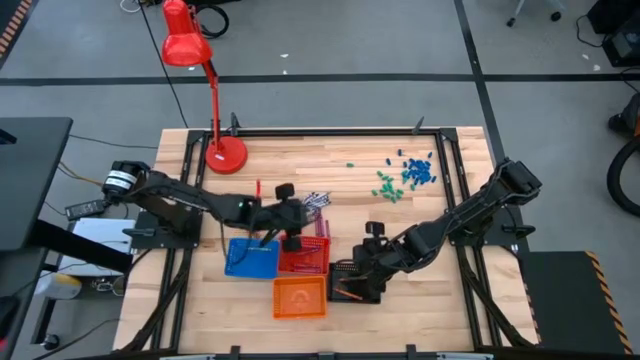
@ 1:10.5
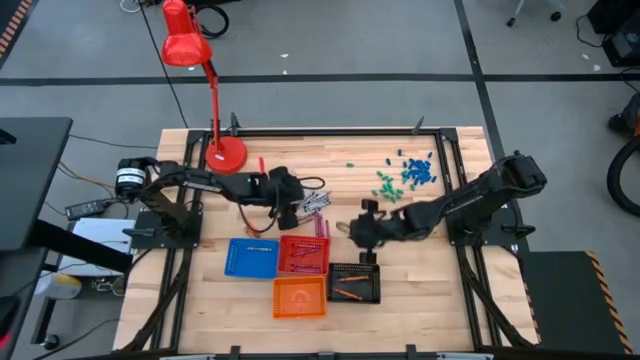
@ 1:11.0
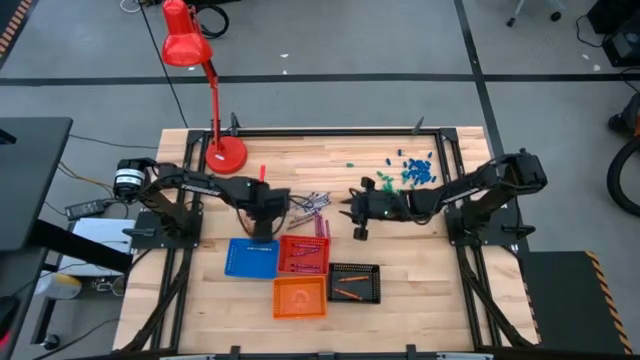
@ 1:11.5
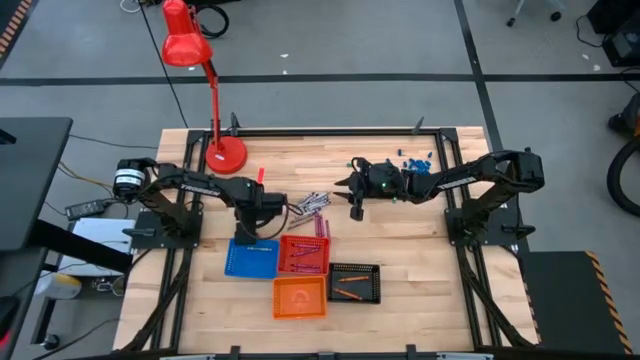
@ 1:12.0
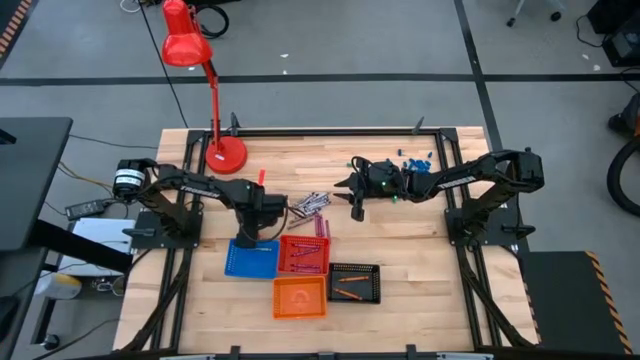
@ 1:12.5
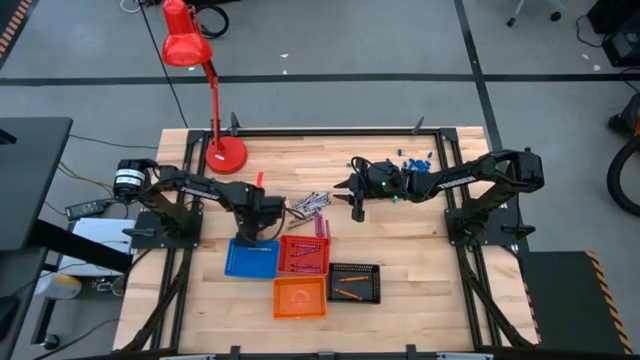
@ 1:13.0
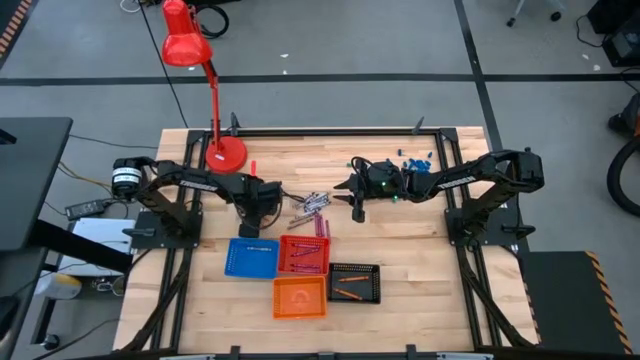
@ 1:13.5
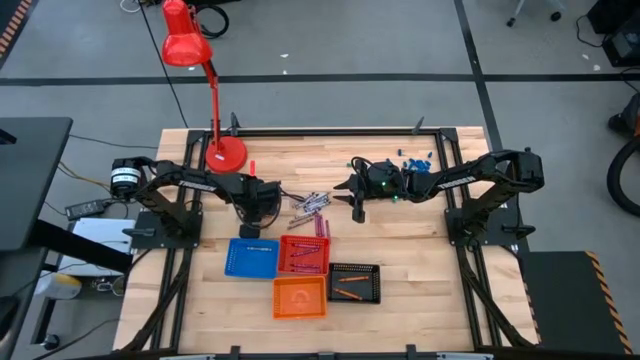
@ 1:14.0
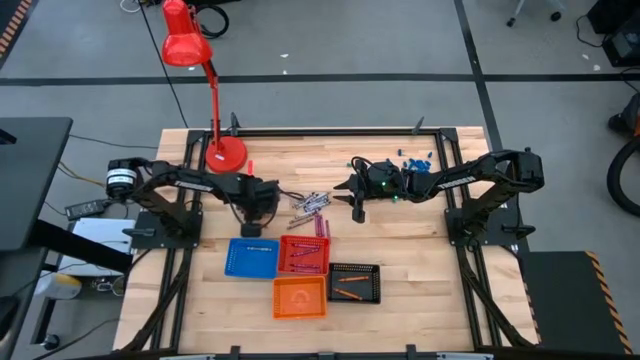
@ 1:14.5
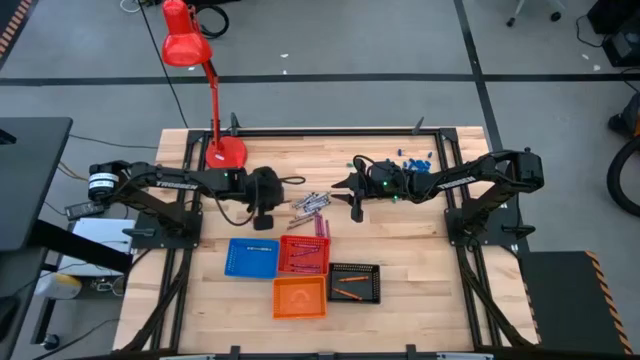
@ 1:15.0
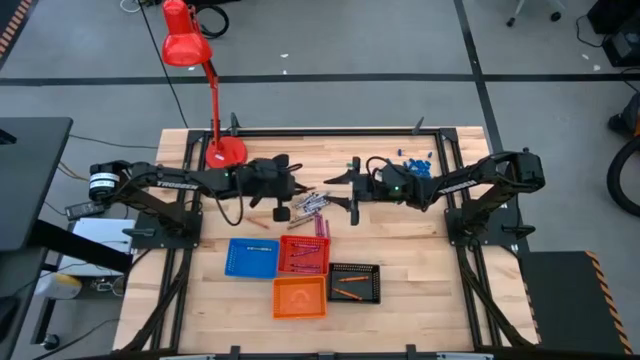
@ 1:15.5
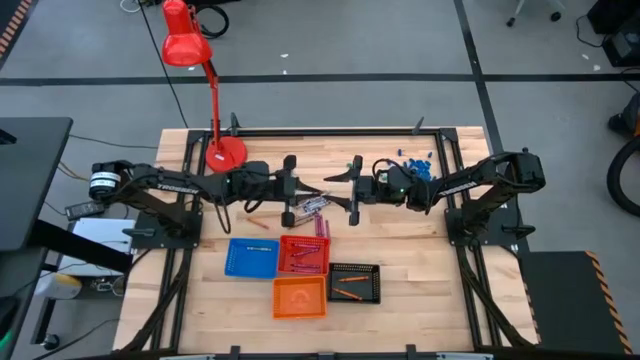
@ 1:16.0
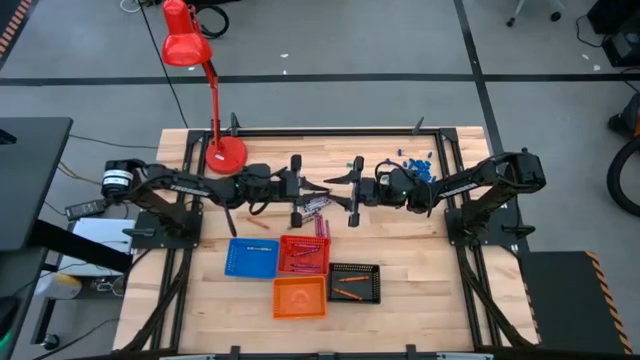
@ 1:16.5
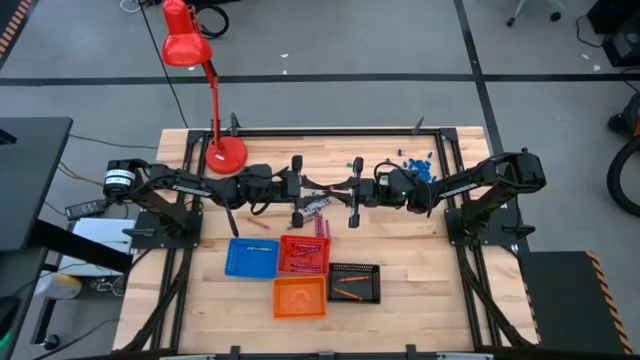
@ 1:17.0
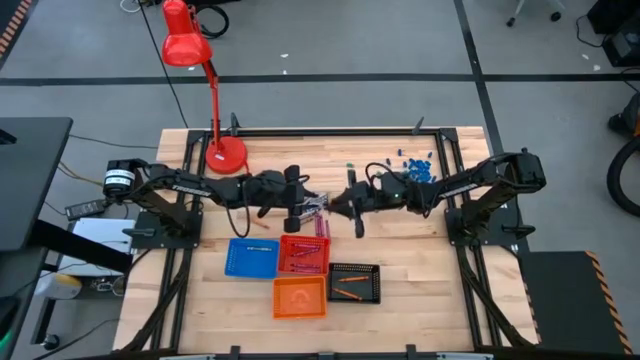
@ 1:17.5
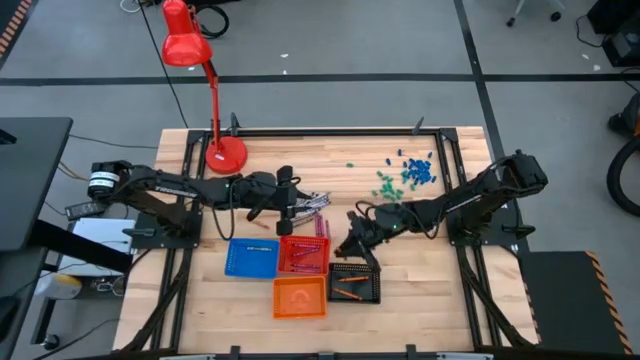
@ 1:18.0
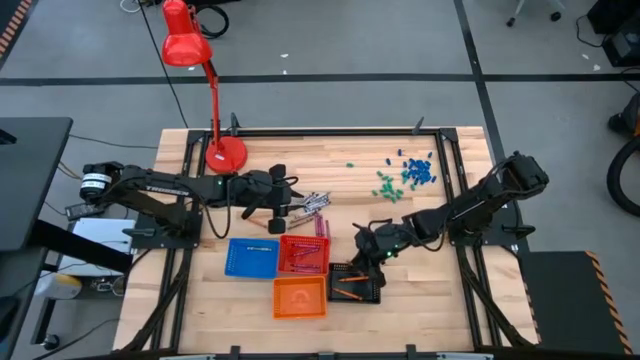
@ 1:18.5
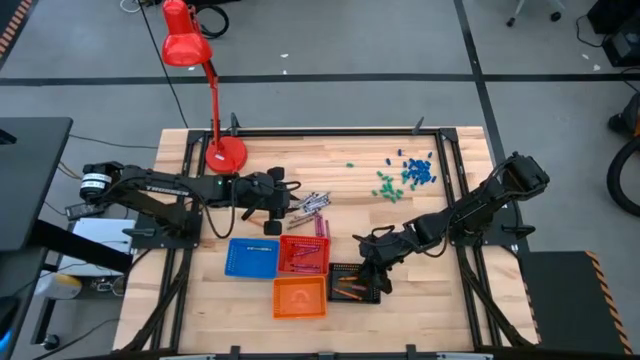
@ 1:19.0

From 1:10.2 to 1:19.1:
Task: Sort crayons
Put the orange crayon into the black bin

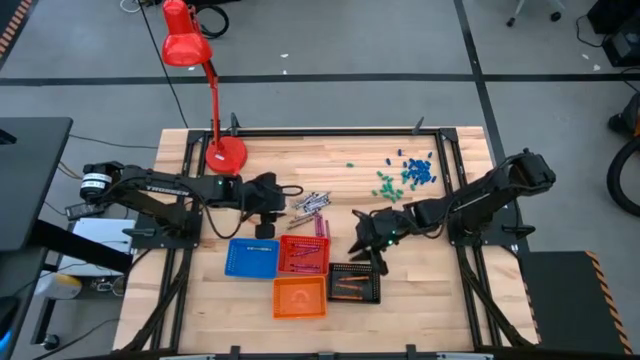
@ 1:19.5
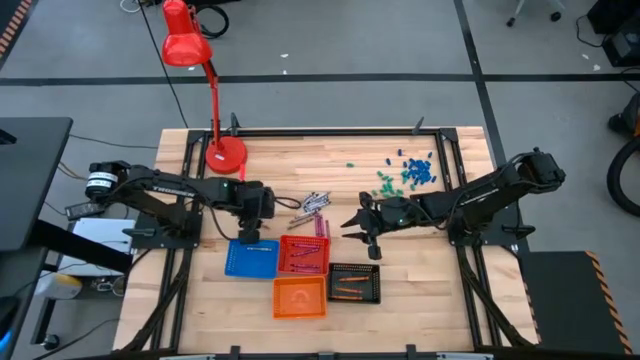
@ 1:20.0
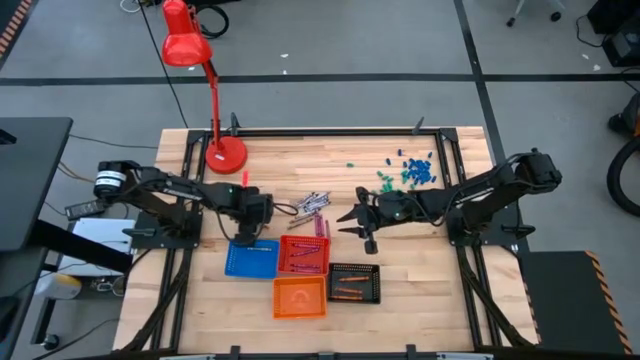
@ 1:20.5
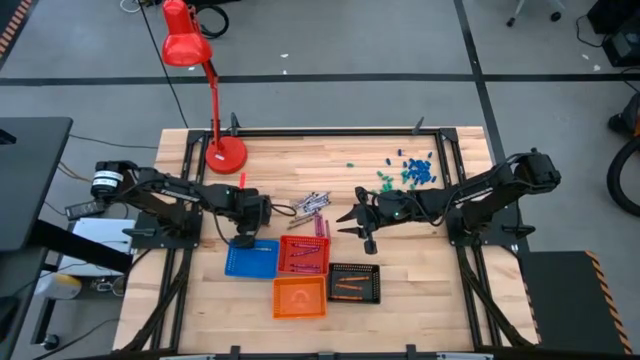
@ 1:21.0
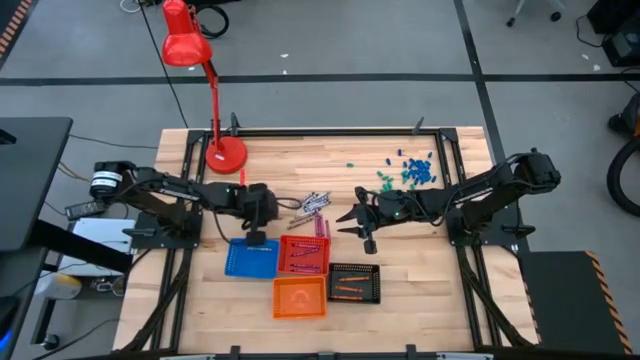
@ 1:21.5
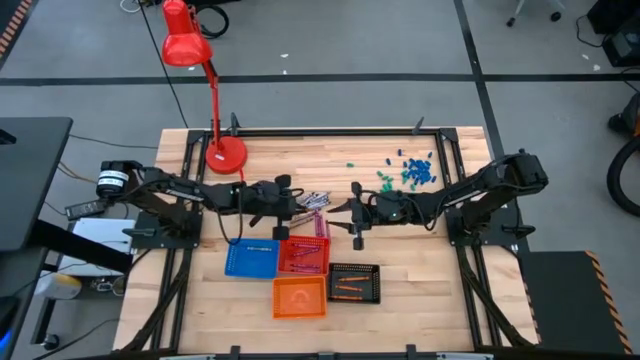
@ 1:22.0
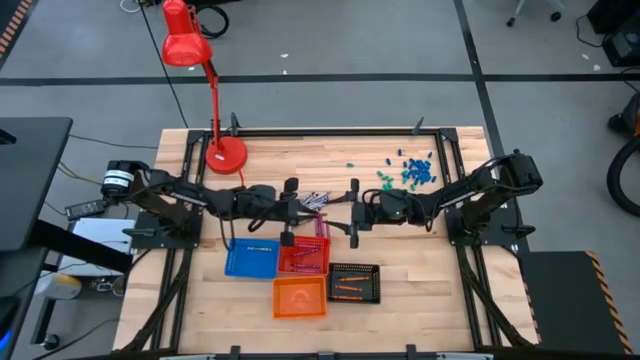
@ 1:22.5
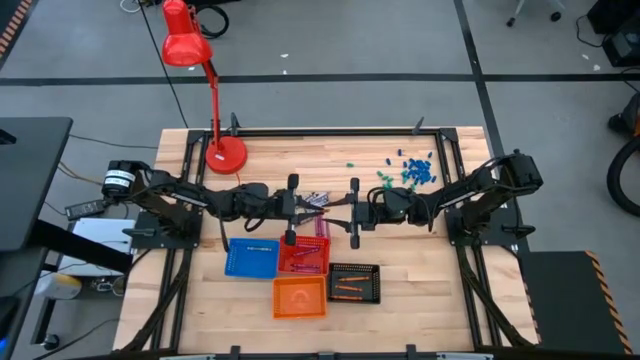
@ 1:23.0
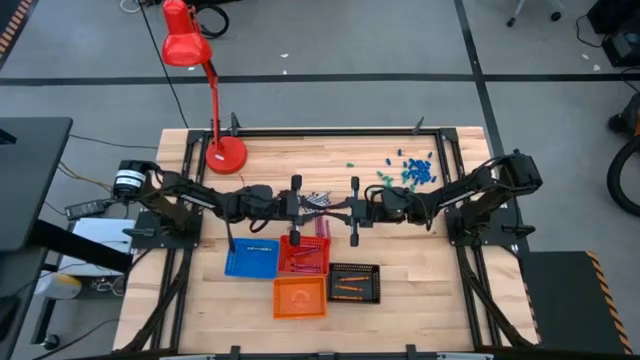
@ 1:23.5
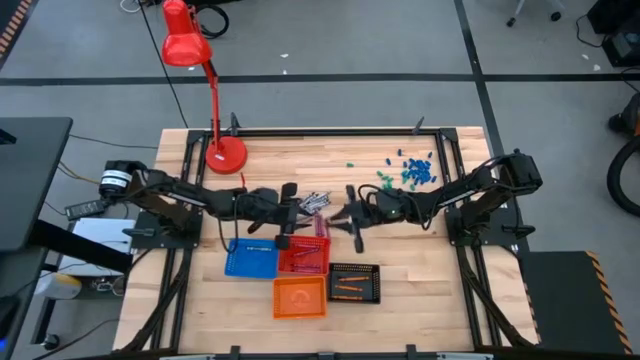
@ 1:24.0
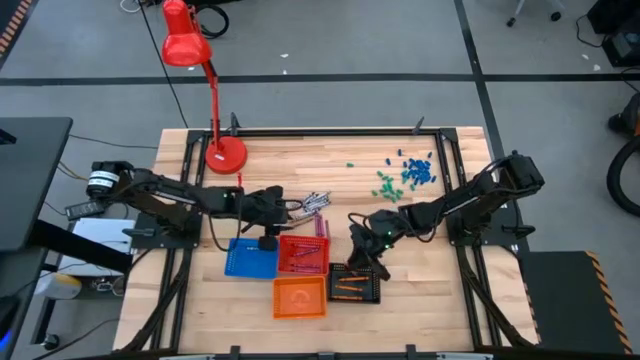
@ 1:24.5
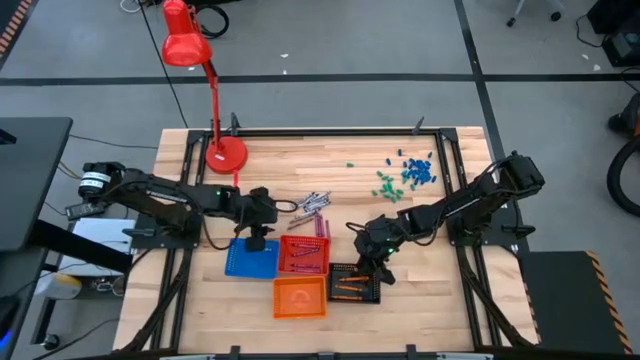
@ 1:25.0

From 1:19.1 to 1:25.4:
Put the orange crayon into the black bin

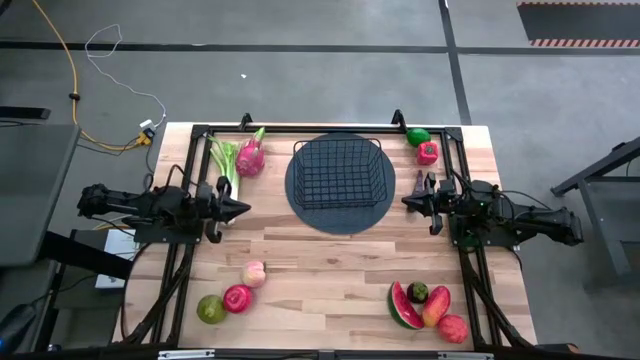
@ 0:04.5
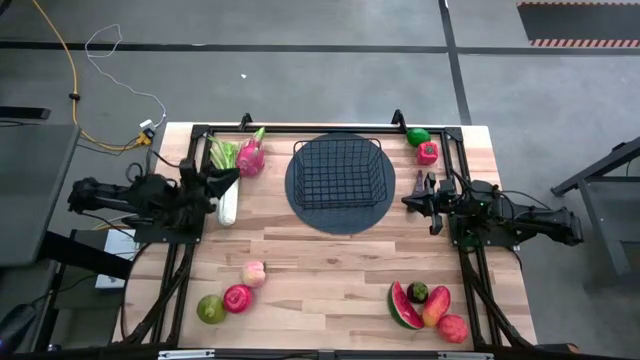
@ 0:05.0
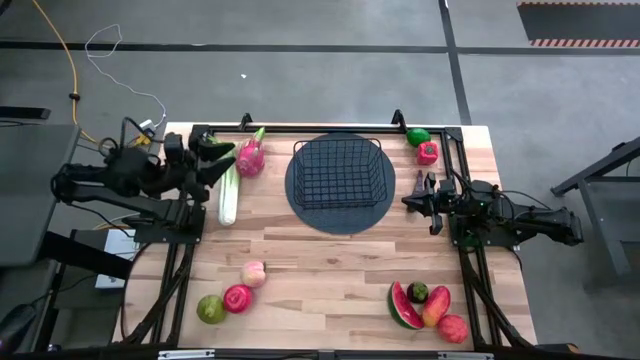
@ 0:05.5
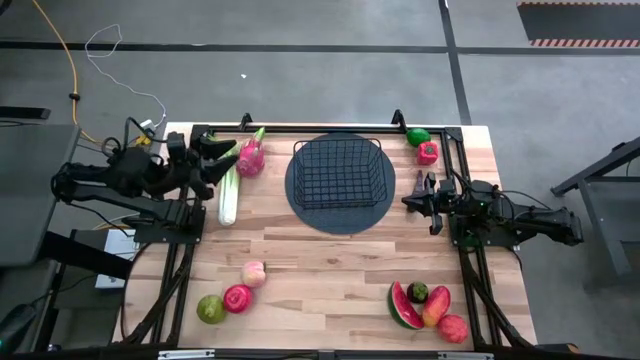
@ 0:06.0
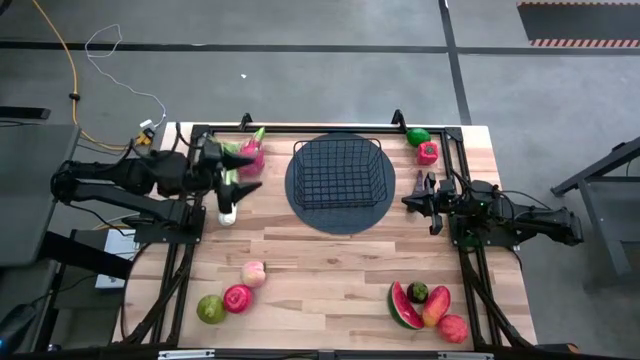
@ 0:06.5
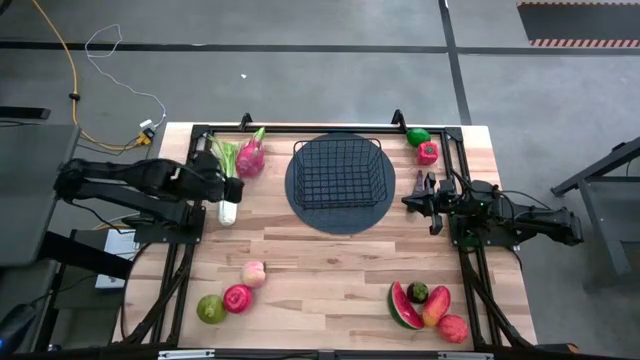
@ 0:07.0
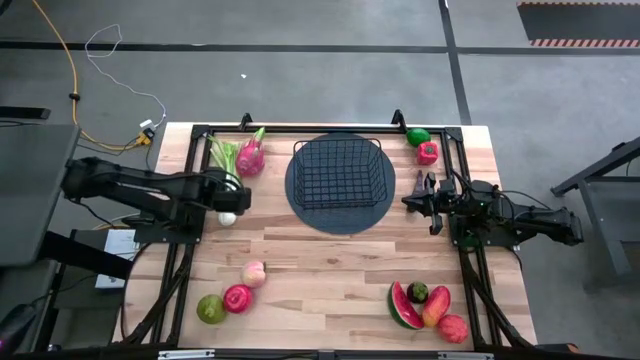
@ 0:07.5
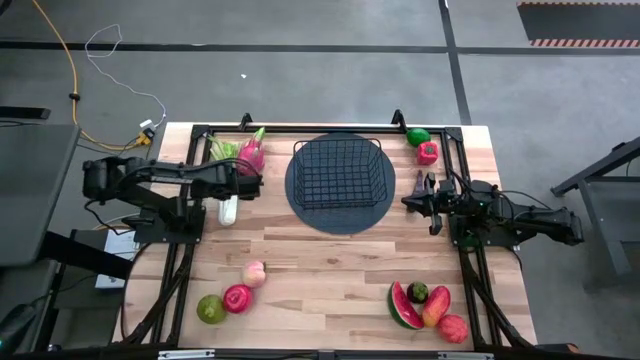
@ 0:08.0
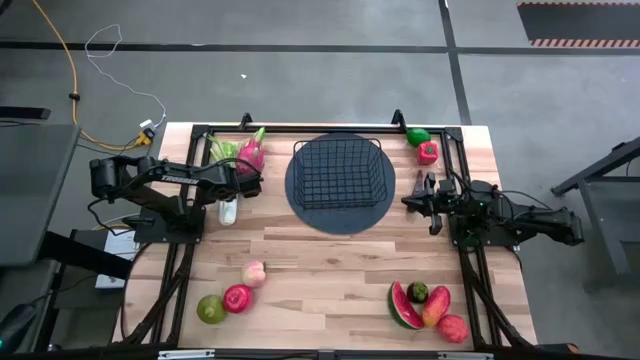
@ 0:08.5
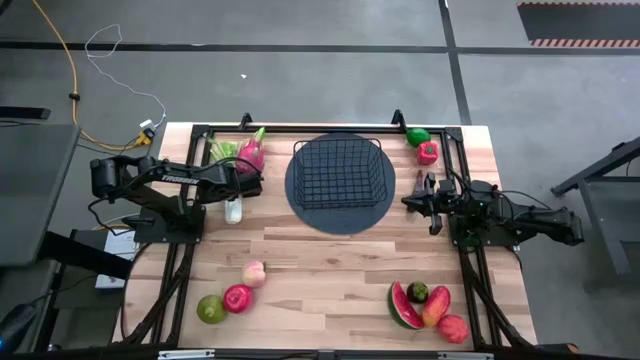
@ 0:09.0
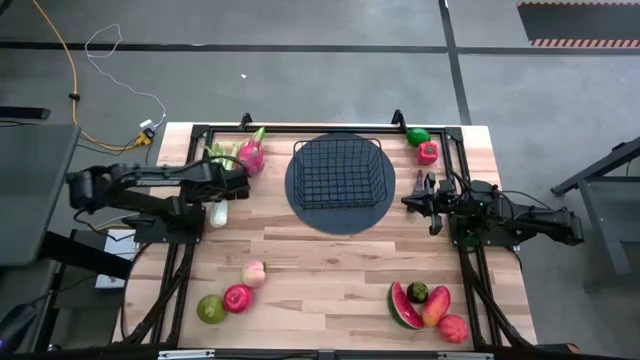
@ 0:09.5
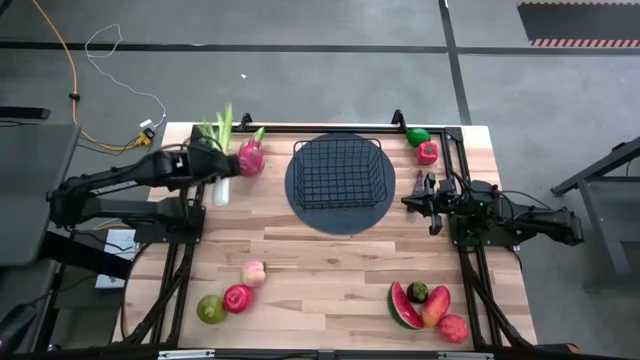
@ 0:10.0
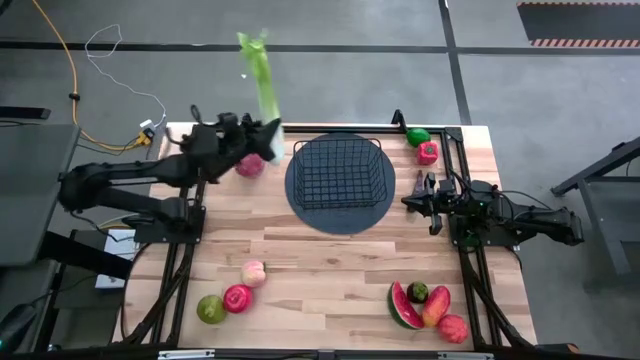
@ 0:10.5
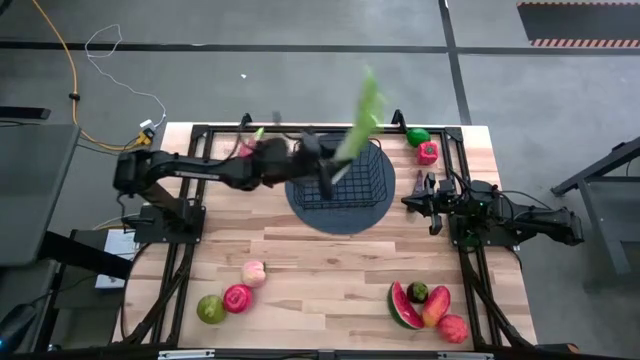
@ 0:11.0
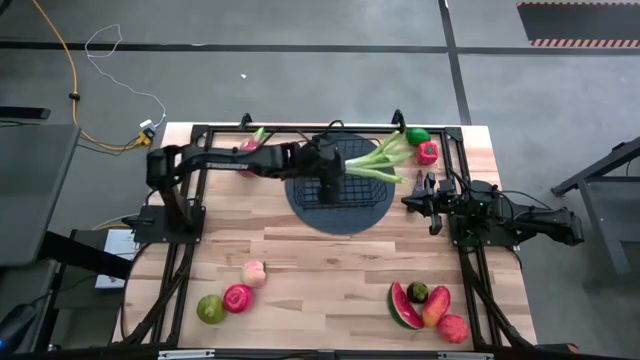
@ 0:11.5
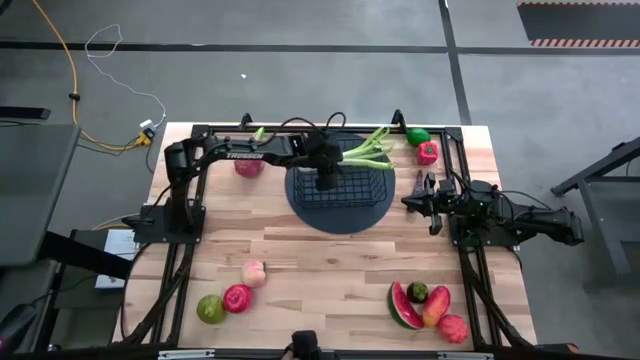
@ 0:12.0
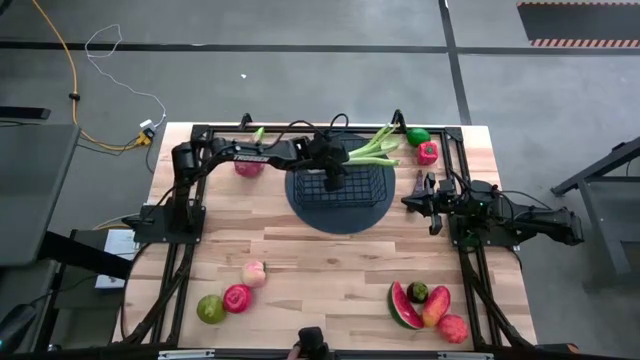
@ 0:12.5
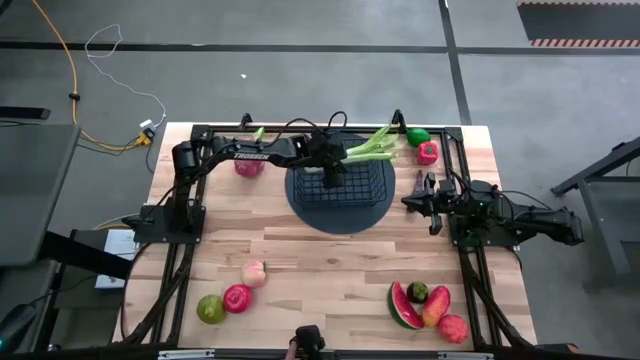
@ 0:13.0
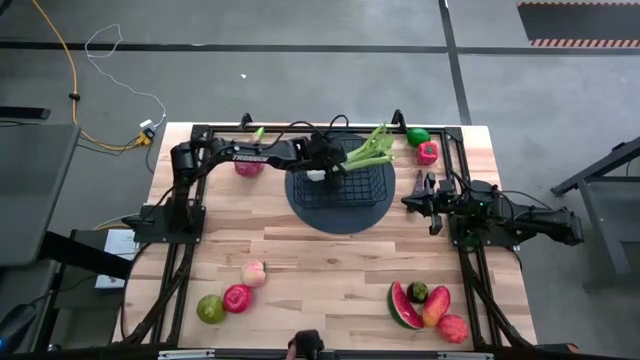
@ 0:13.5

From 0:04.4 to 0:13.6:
Task: Build produce basket
Put the celery into the wire basket
